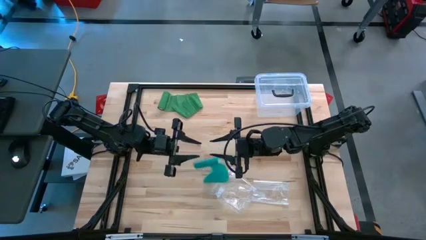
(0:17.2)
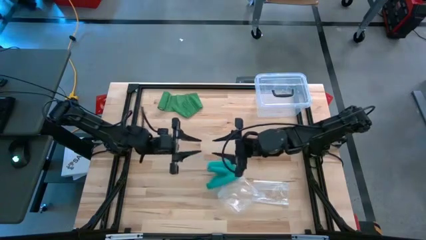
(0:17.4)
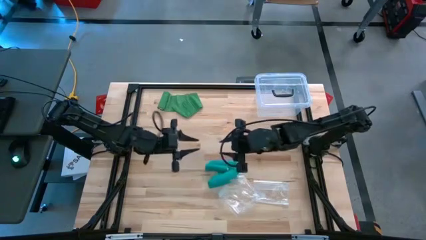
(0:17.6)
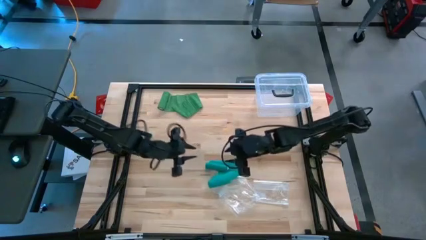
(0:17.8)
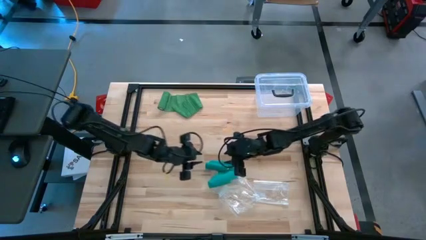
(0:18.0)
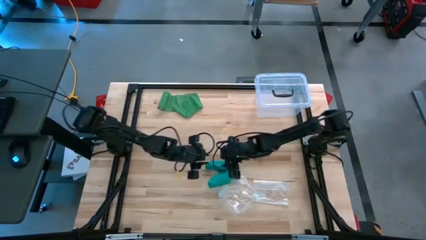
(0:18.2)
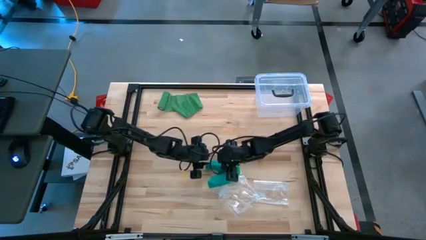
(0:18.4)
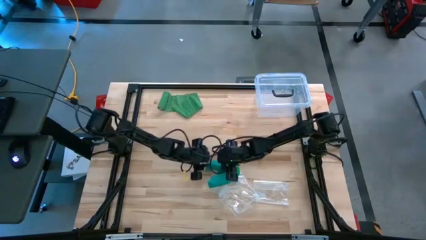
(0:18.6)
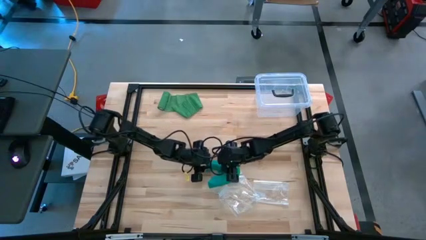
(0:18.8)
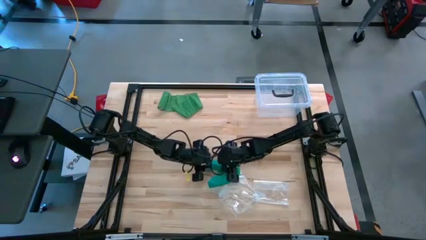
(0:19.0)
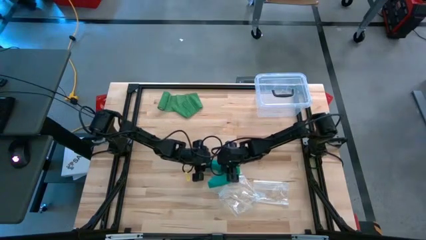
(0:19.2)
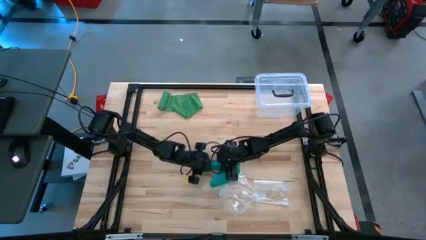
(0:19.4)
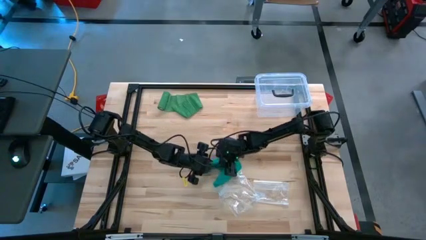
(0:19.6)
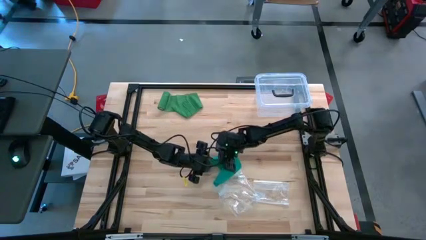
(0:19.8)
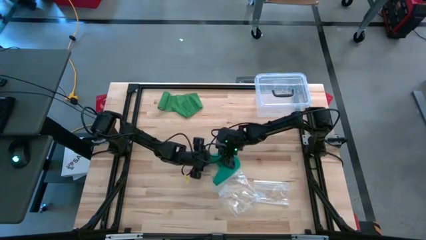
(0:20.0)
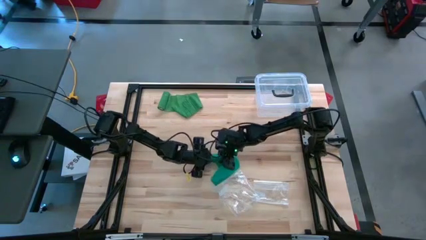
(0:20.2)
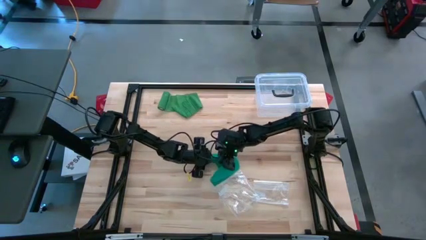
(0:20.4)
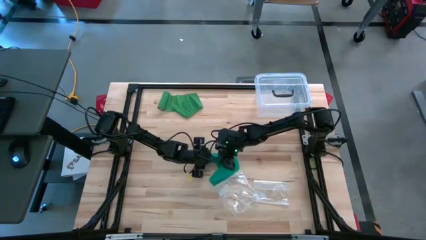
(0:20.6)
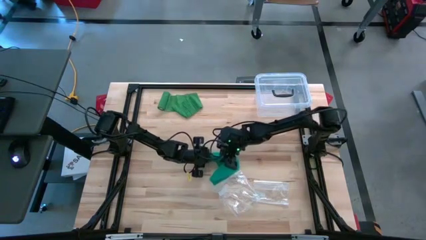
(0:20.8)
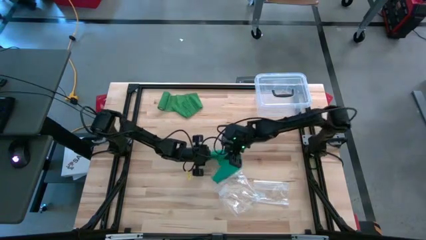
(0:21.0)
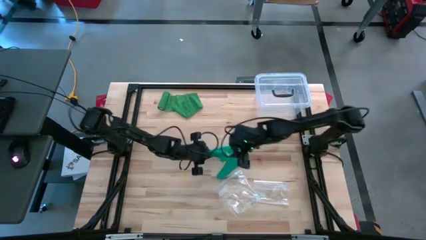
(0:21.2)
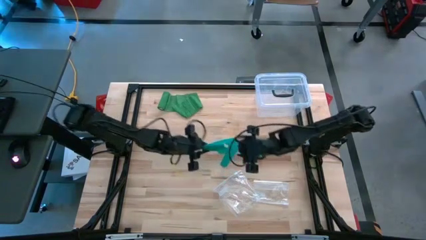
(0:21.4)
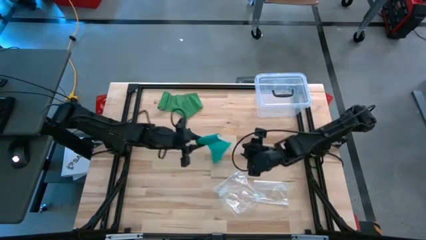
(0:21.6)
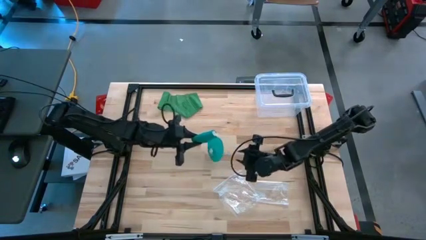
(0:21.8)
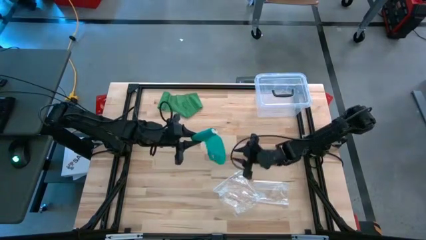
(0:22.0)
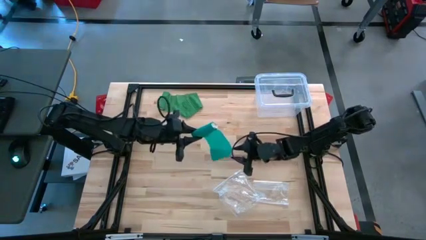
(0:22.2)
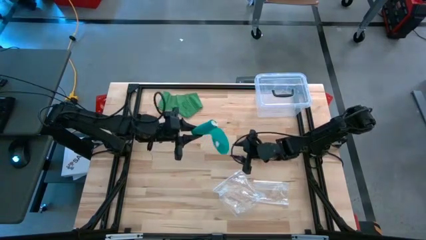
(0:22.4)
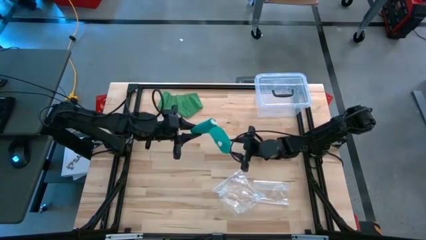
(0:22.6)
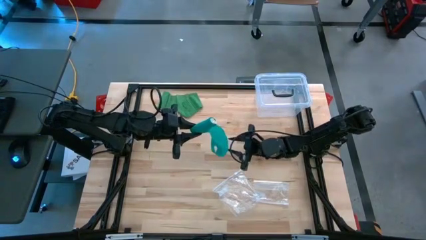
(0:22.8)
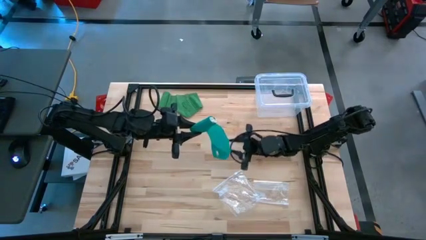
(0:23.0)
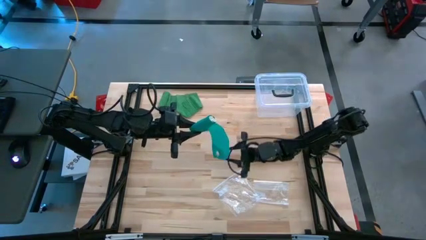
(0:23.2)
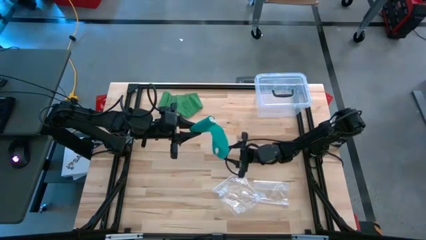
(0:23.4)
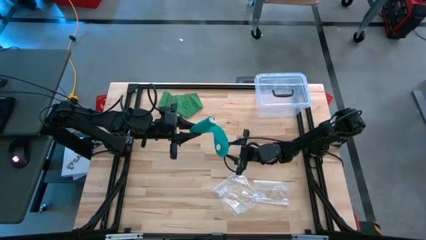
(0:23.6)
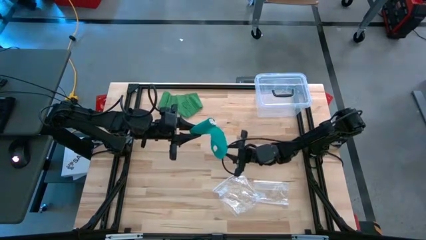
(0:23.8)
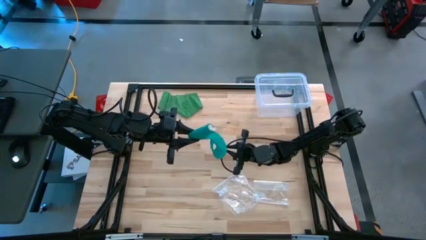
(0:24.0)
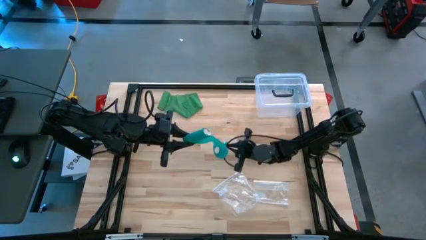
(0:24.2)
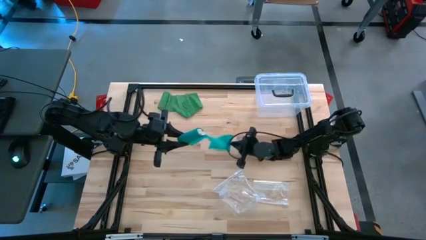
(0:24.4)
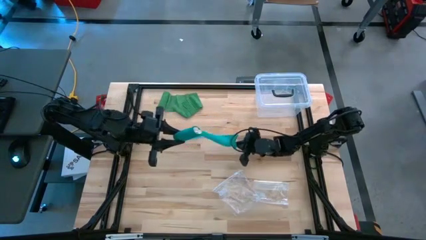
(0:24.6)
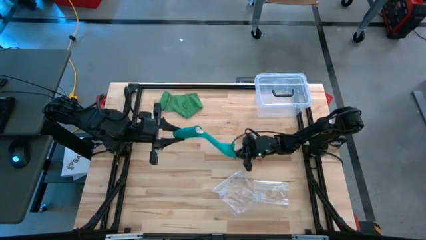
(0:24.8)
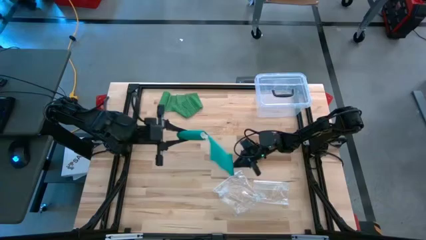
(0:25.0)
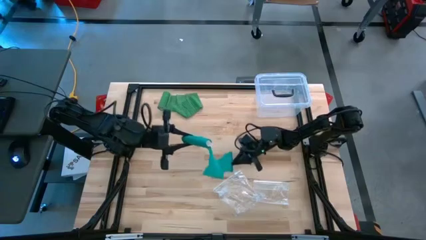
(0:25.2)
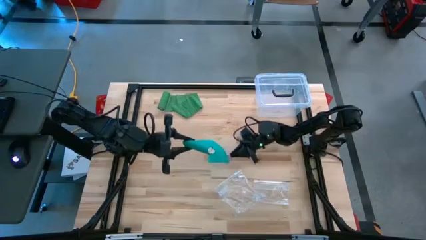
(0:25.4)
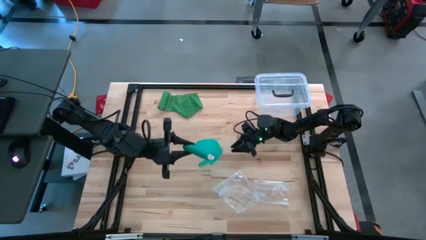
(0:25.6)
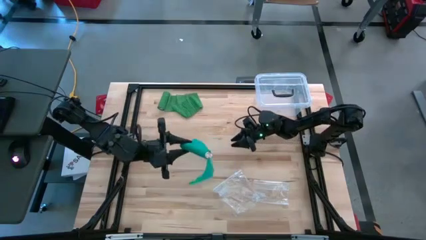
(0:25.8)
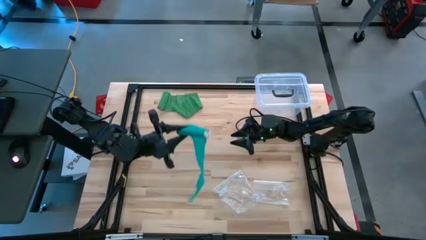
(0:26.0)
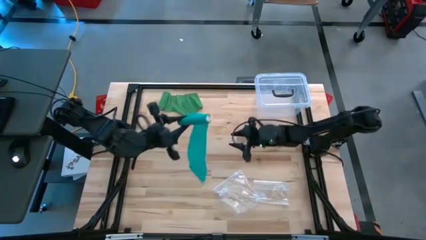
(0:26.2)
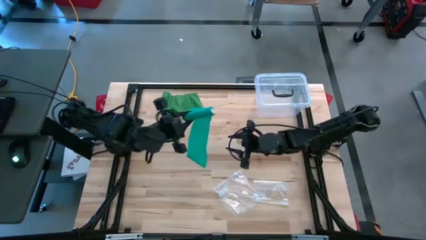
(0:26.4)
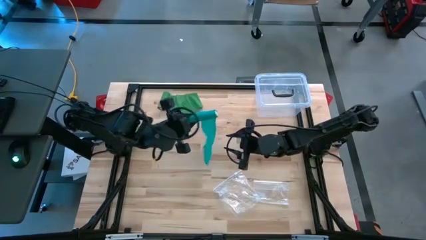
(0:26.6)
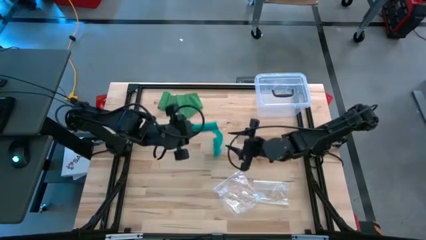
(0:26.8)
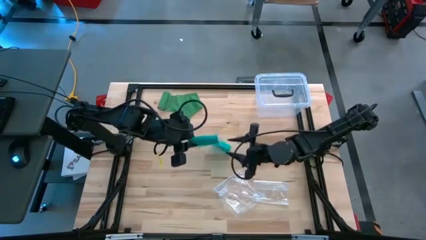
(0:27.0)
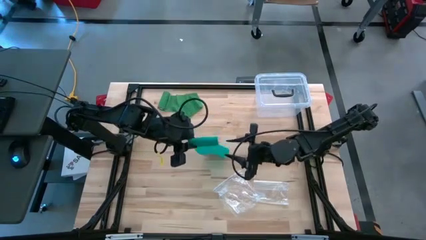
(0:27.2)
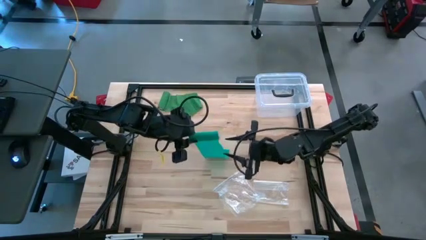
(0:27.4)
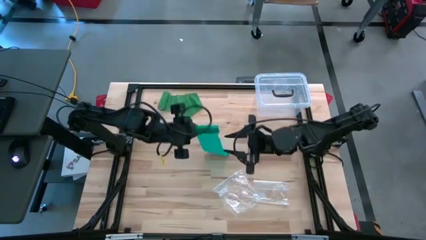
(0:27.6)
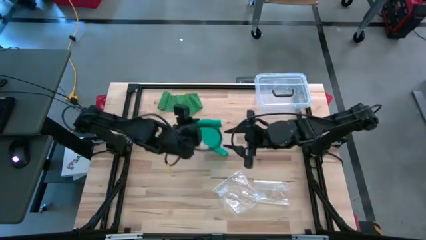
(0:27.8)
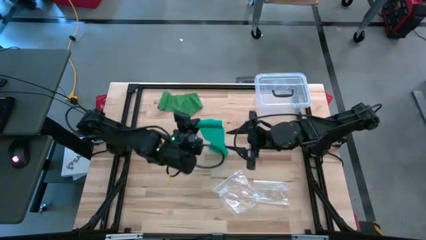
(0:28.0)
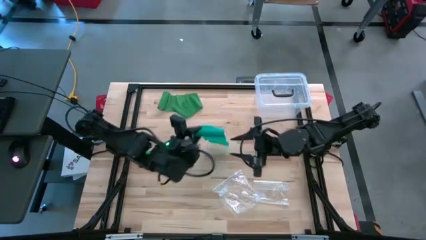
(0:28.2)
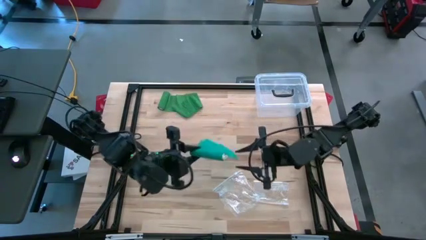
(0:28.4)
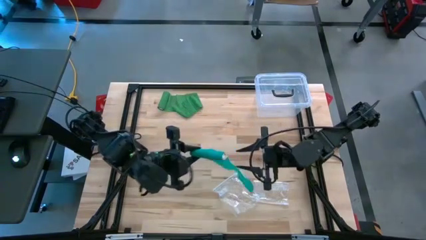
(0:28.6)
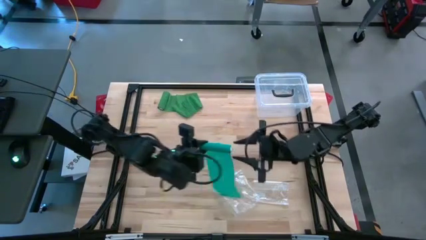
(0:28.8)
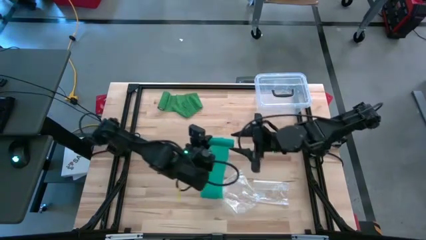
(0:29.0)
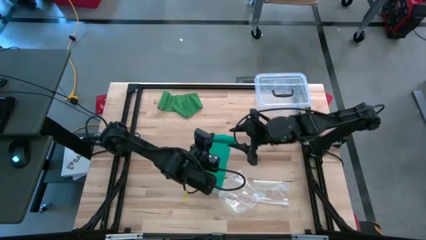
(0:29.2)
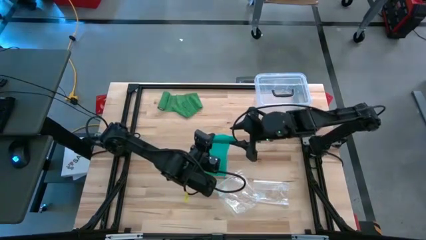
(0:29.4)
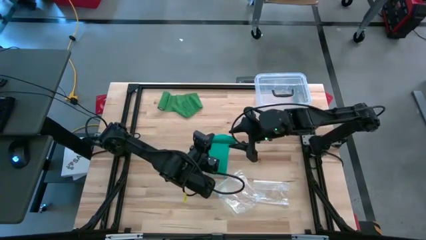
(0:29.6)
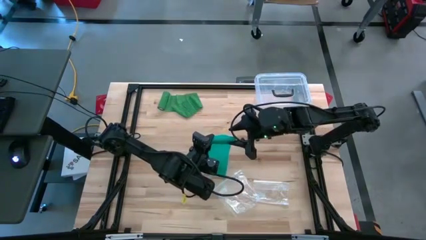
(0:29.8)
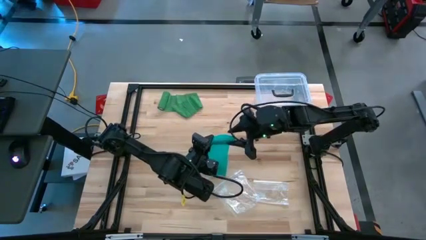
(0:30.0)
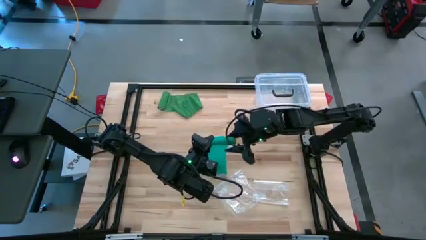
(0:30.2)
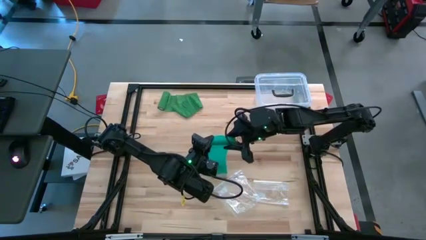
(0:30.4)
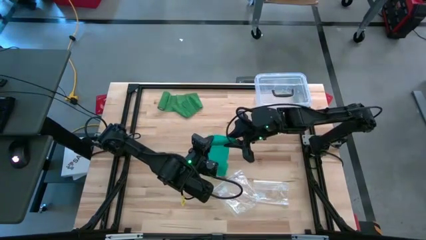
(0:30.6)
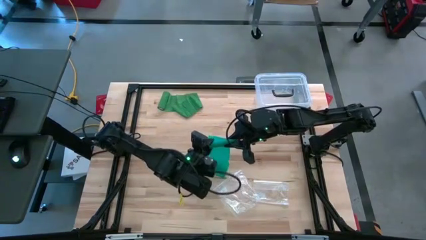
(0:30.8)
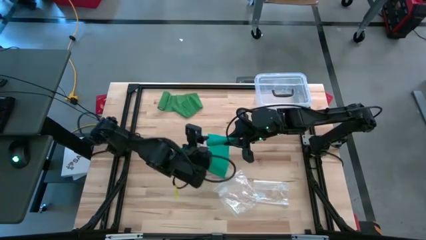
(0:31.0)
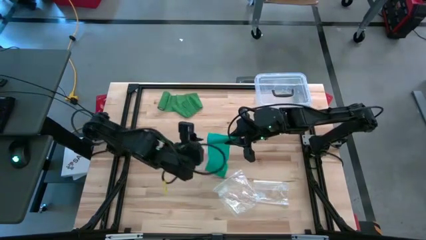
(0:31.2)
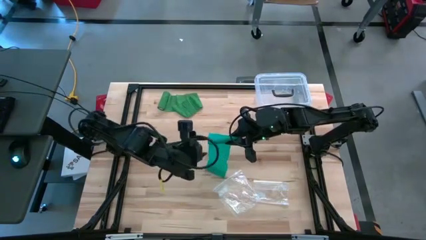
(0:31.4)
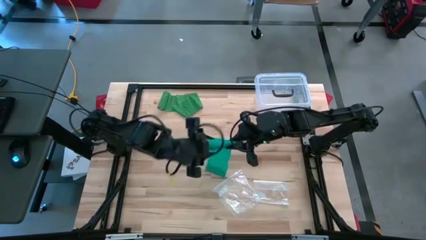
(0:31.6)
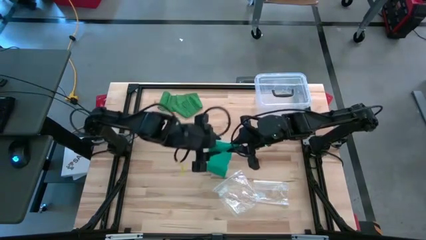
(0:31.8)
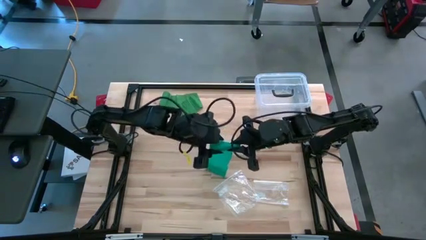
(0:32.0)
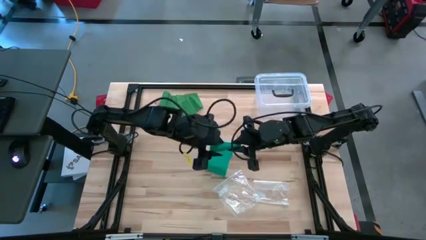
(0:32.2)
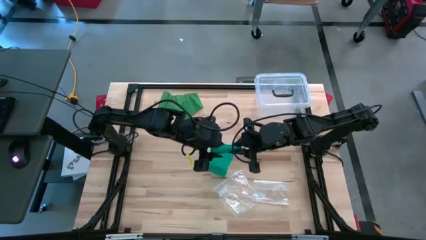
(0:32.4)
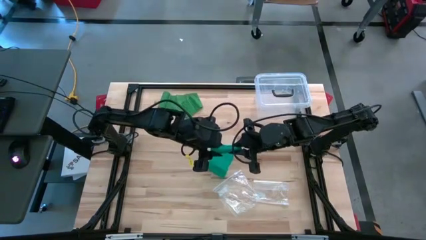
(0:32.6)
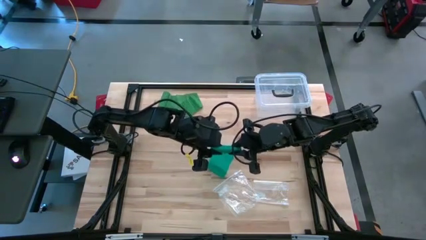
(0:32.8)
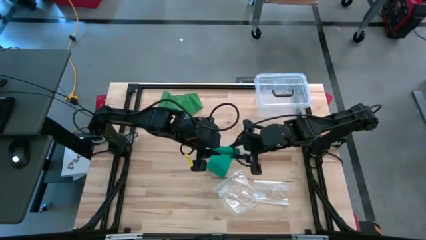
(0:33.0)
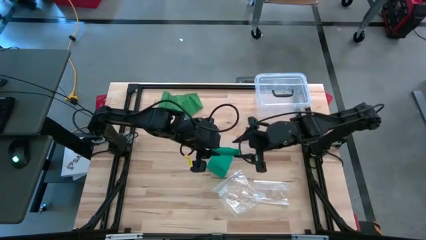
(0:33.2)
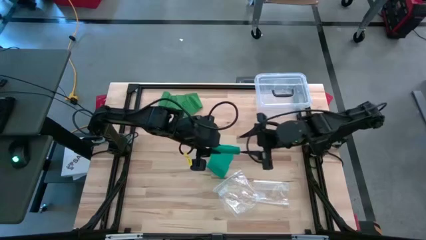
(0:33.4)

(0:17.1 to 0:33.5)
Task: Roll bandage
Roll the blue bandage
